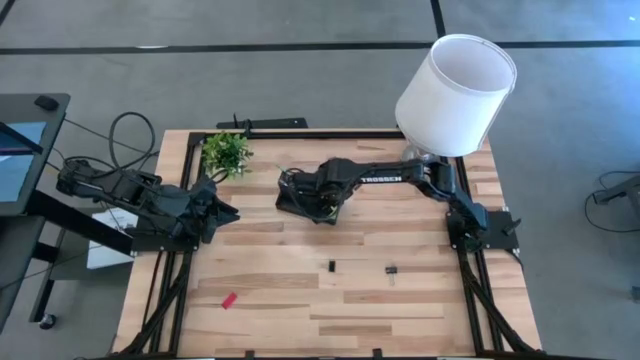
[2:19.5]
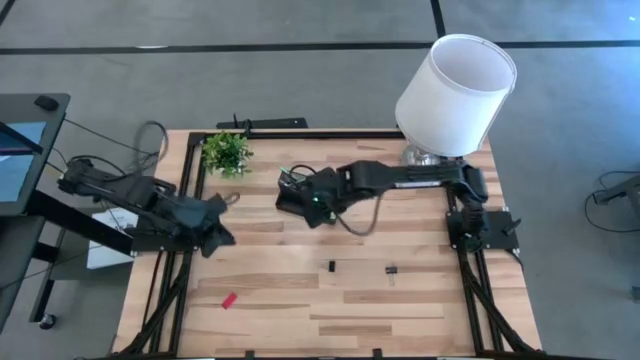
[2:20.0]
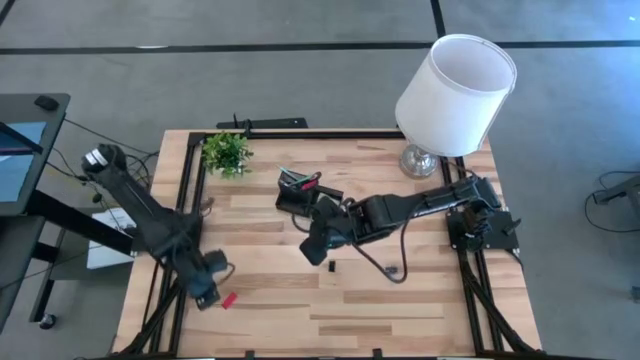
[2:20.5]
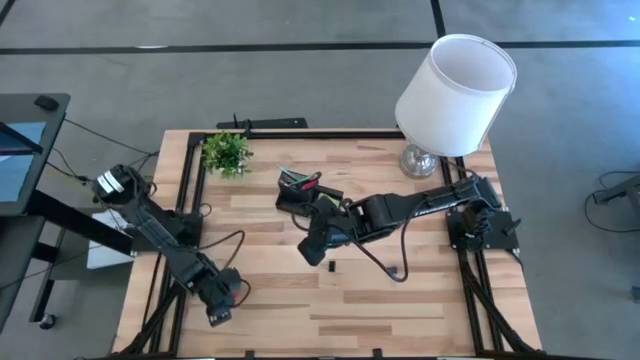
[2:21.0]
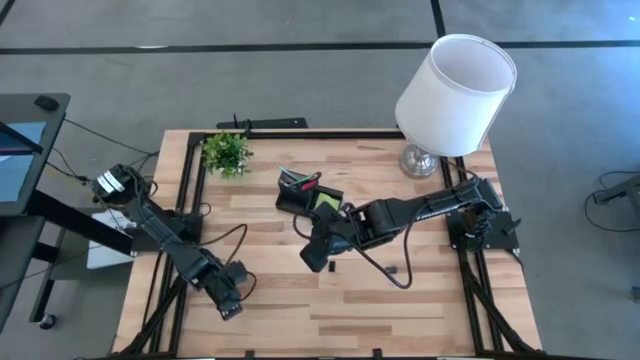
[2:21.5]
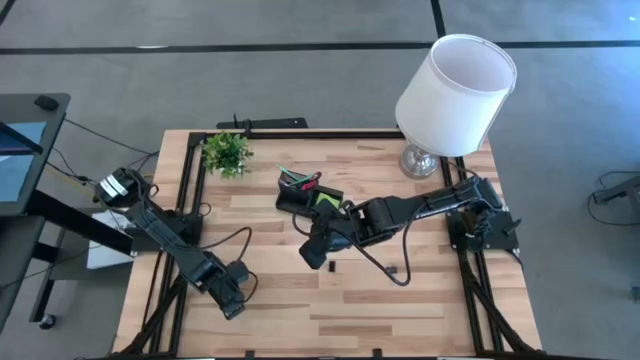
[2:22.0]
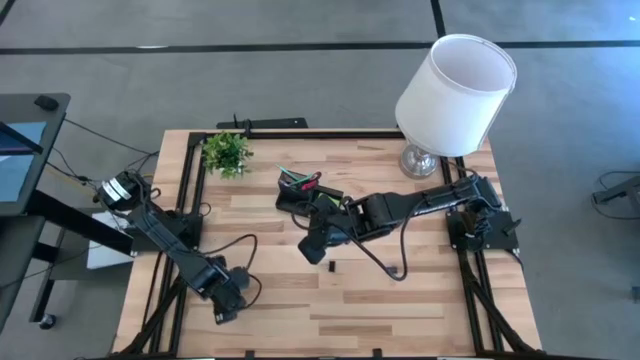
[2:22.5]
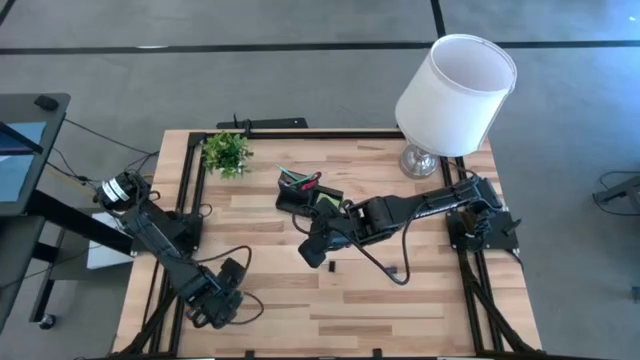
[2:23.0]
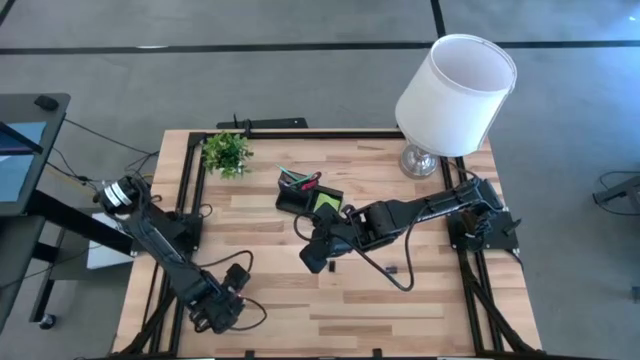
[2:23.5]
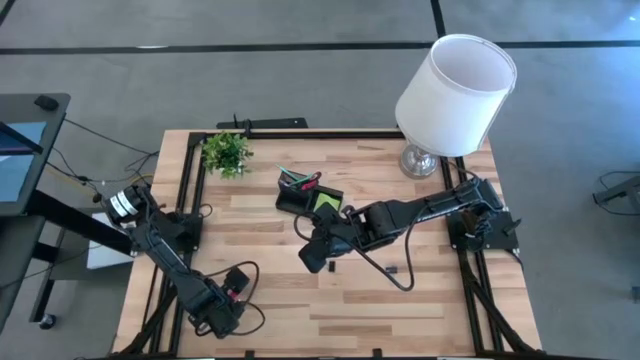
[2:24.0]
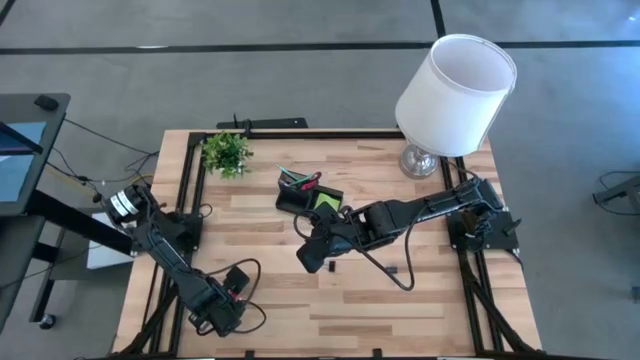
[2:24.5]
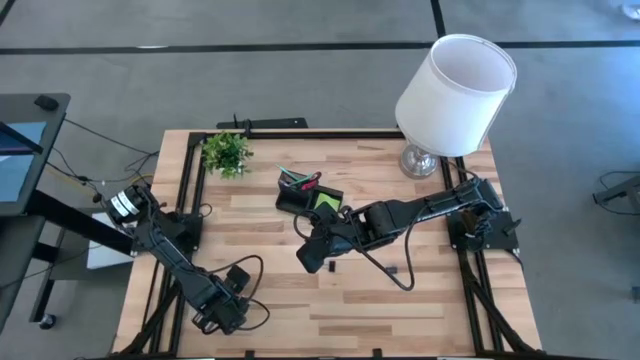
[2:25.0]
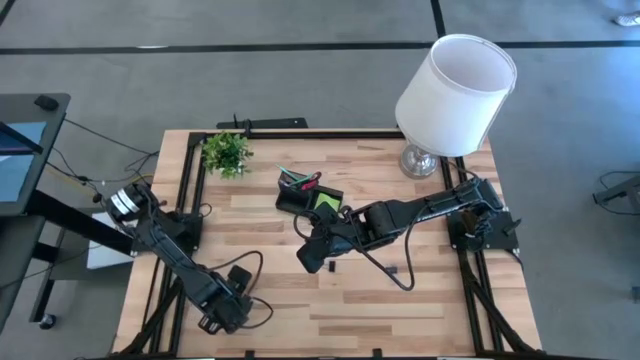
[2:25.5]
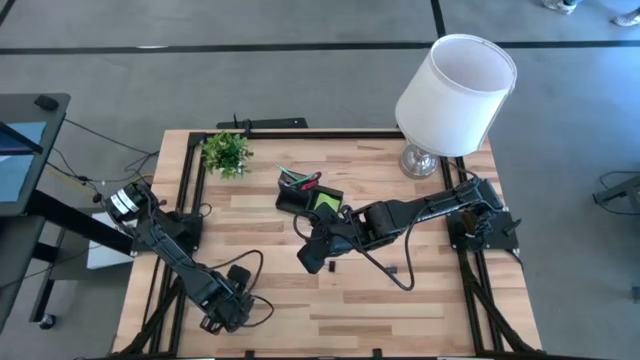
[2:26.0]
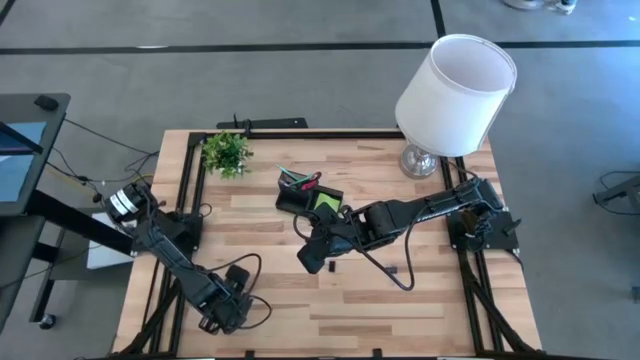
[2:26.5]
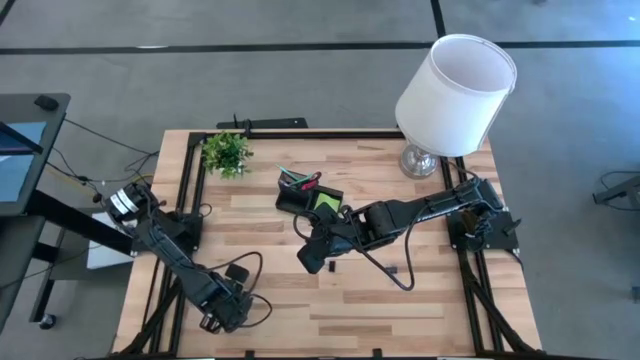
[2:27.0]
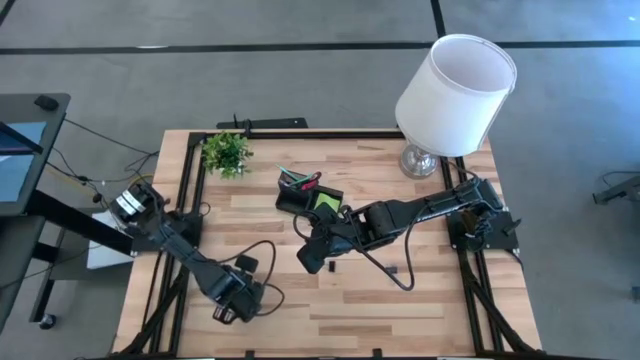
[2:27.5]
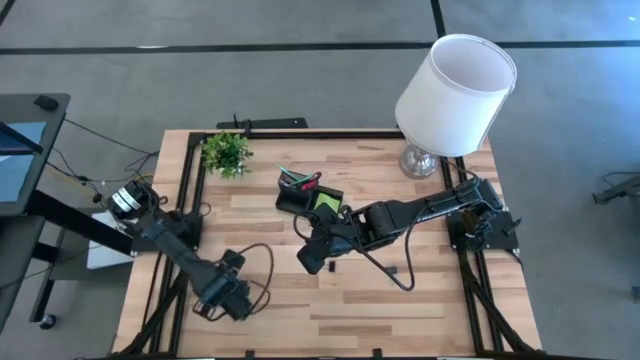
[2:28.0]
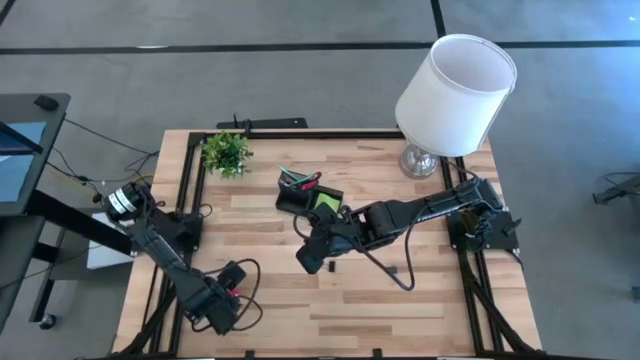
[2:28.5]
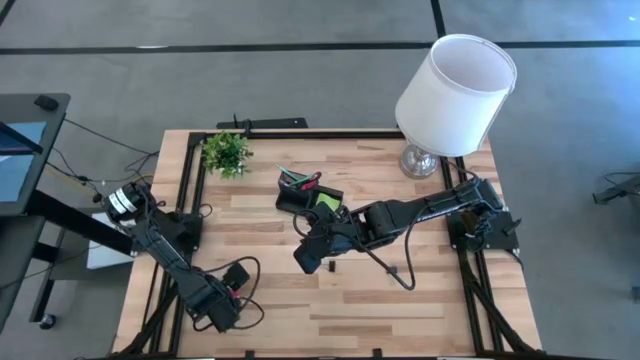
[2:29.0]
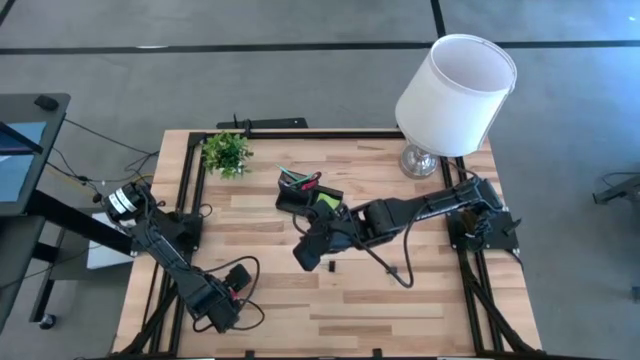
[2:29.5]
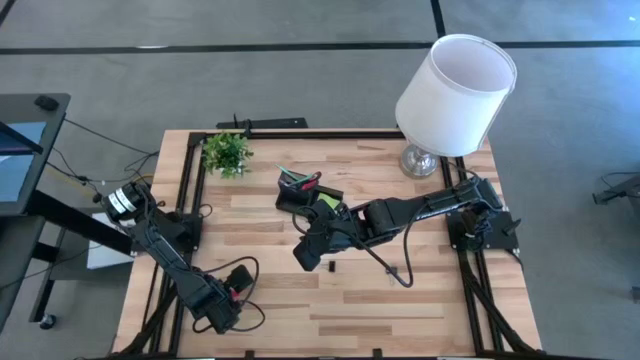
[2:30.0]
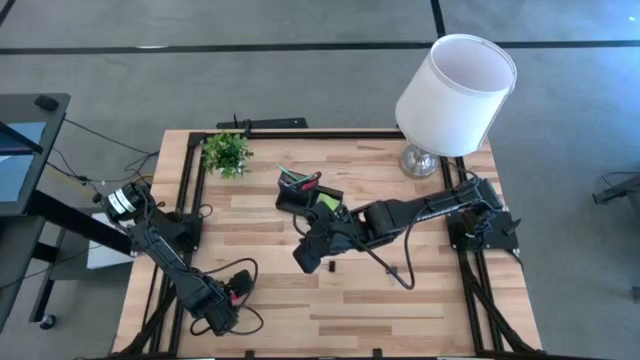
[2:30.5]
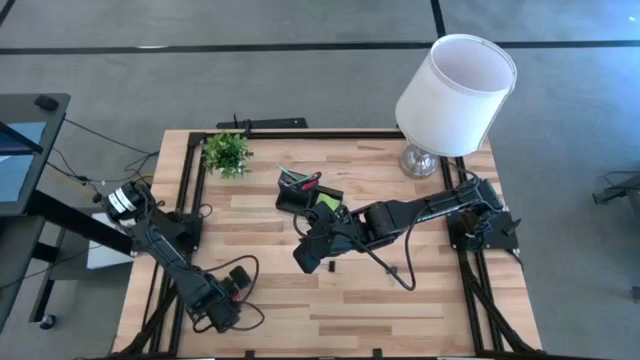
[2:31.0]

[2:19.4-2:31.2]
Task: Pick and place office supplies into organizer
Put the red eraser into the black desk organizer

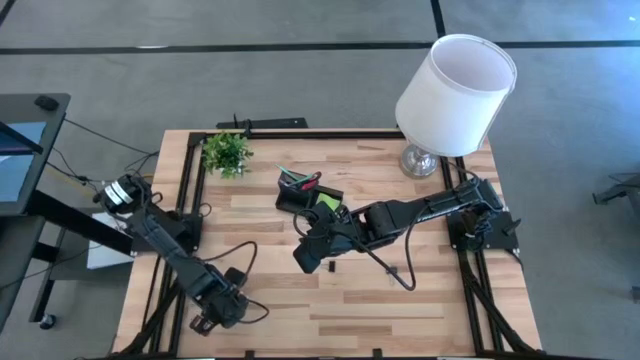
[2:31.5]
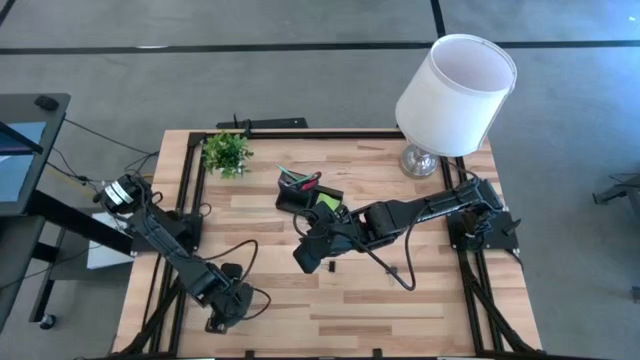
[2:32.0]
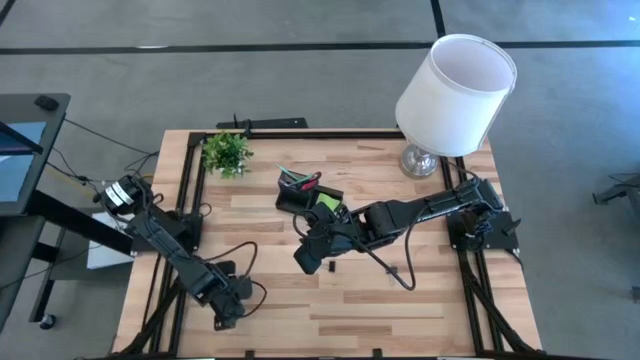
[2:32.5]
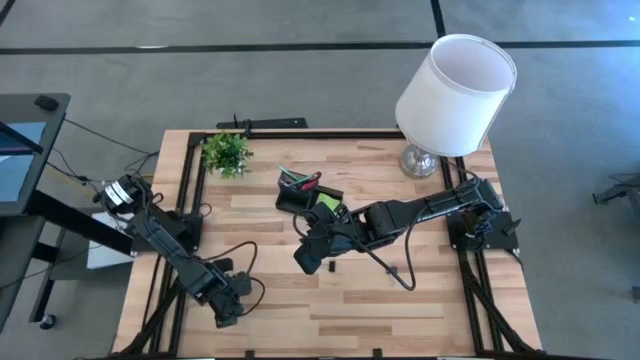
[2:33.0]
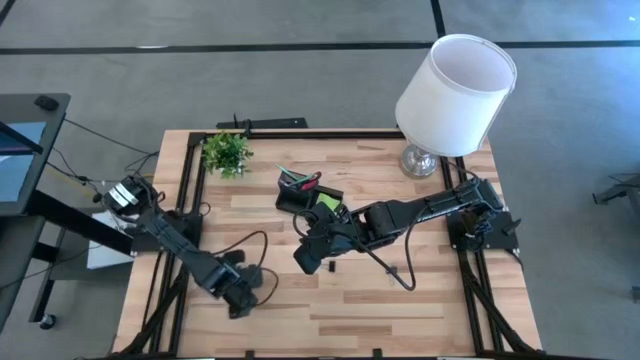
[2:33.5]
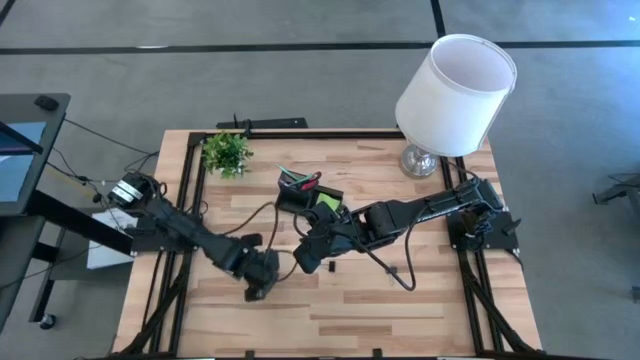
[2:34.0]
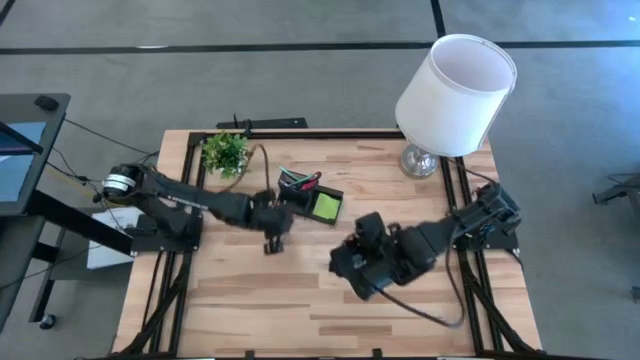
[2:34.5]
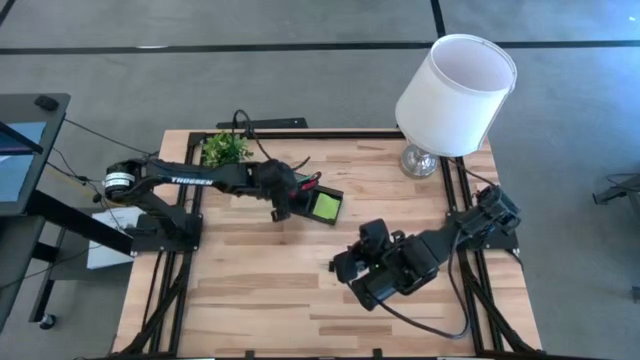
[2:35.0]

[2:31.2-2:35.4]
Put the red eraser into the black desk organizer

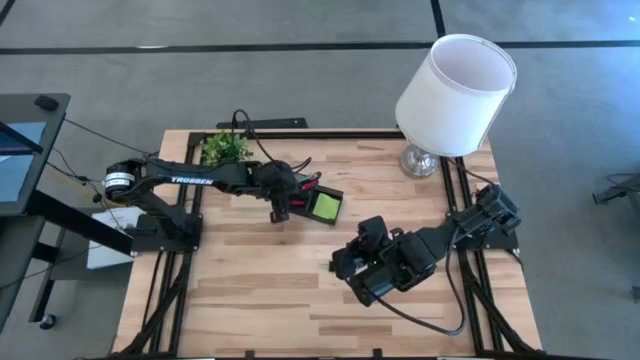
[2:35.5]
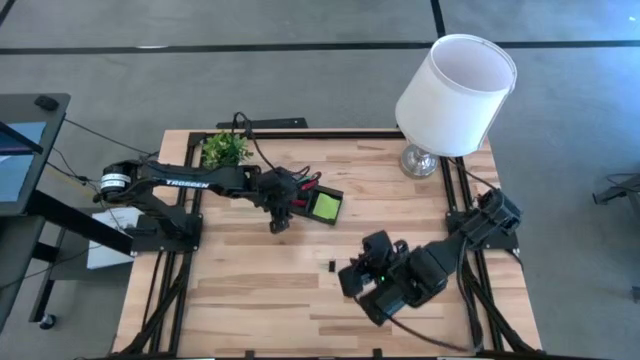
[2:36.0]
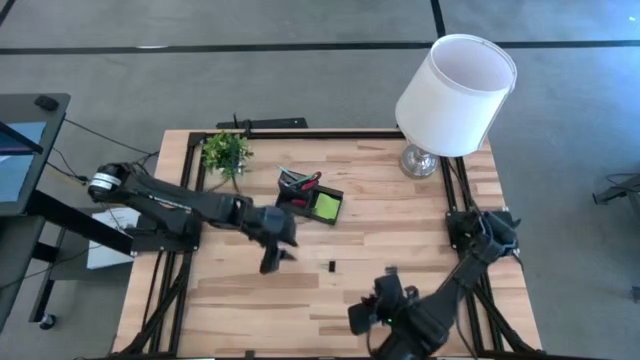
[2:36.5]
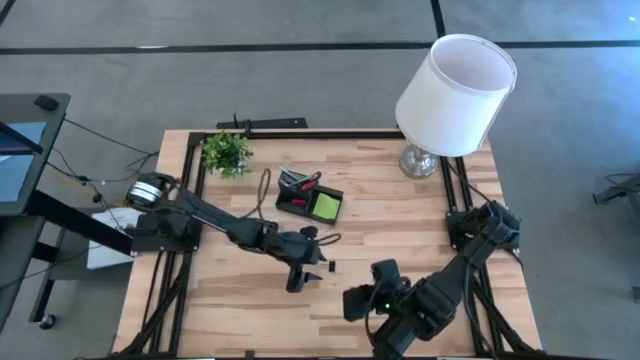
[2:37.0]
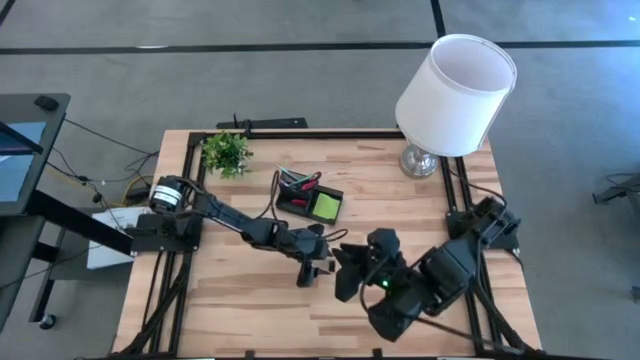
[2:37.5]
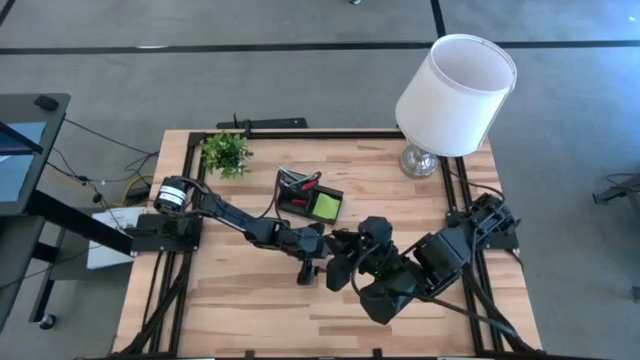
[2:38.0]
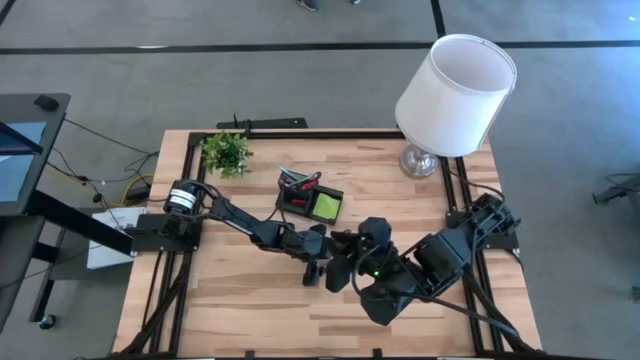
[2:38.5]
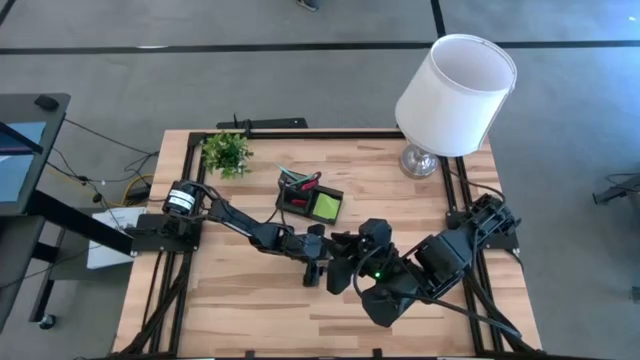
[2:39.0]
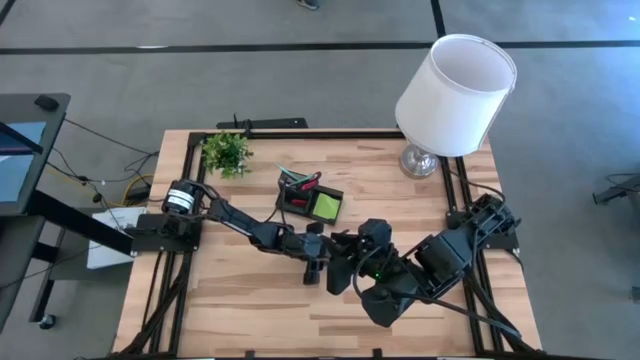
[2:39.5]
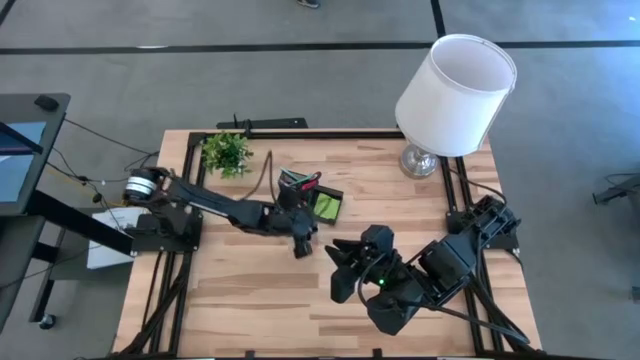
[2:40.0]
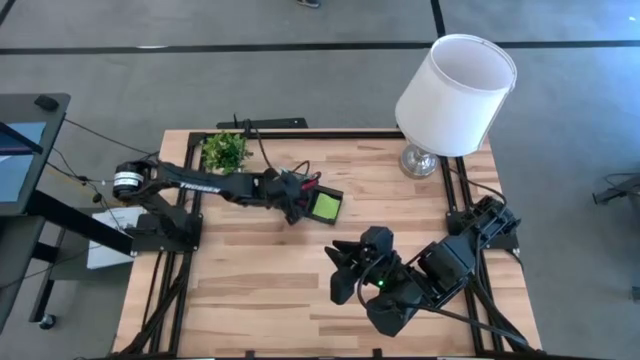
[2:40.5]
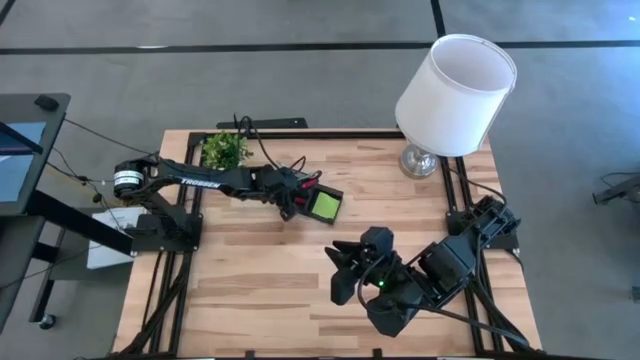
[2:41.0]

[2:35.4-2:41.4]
Put the left black binder clip into the black desk organizer
